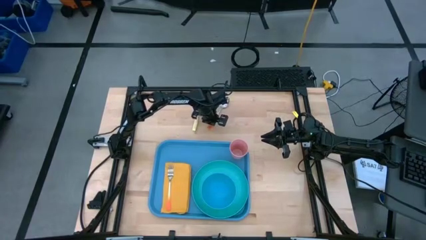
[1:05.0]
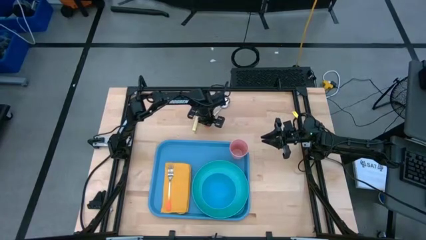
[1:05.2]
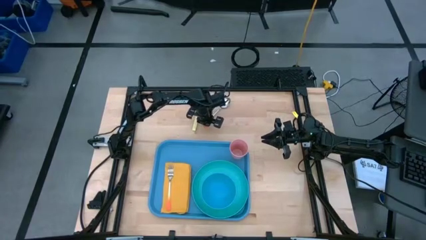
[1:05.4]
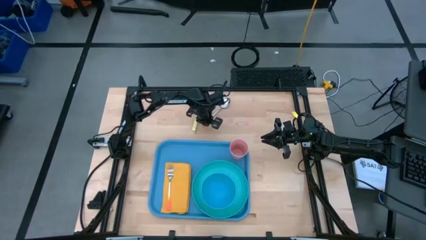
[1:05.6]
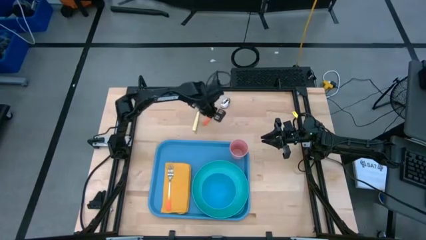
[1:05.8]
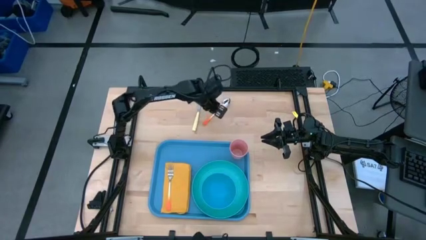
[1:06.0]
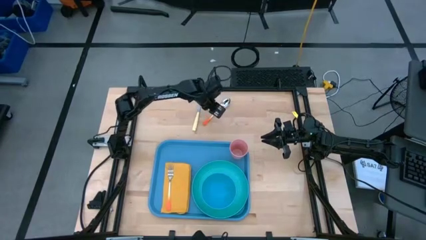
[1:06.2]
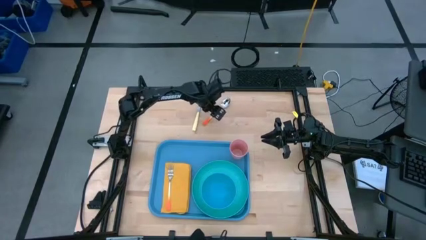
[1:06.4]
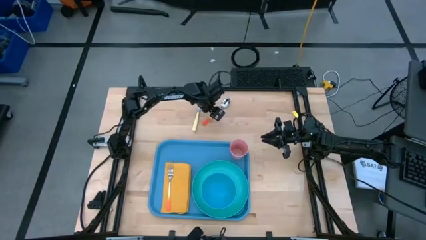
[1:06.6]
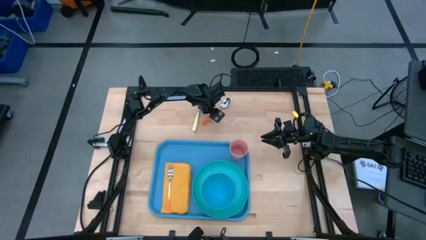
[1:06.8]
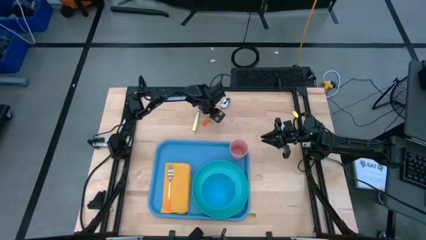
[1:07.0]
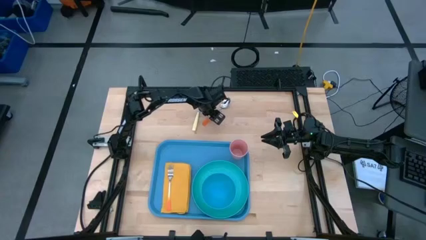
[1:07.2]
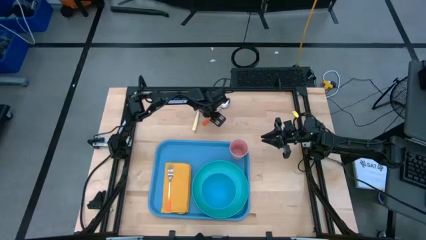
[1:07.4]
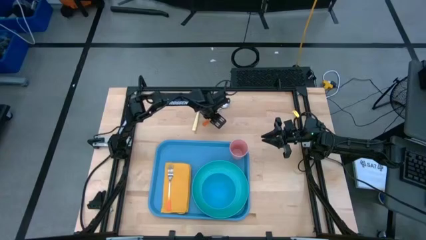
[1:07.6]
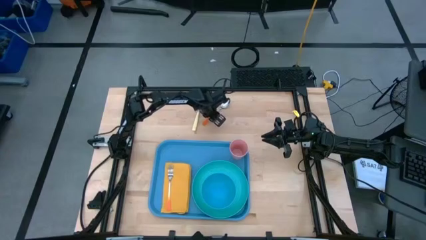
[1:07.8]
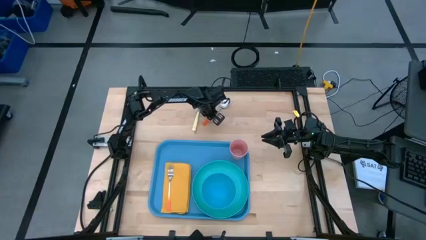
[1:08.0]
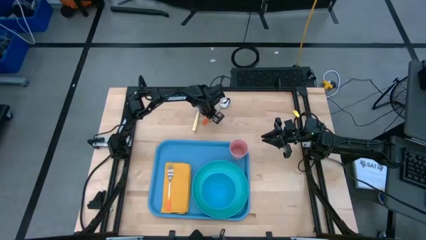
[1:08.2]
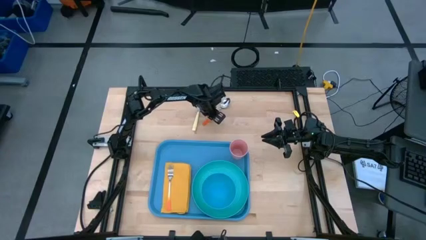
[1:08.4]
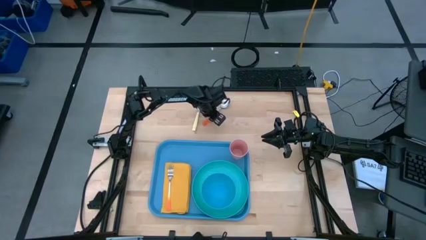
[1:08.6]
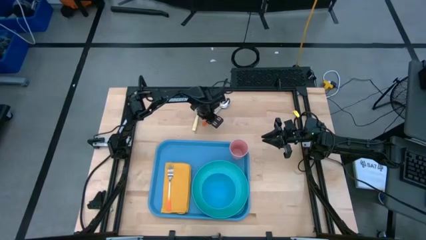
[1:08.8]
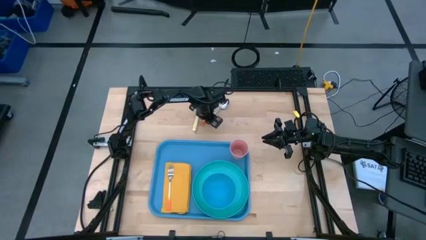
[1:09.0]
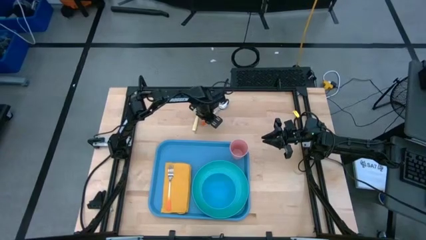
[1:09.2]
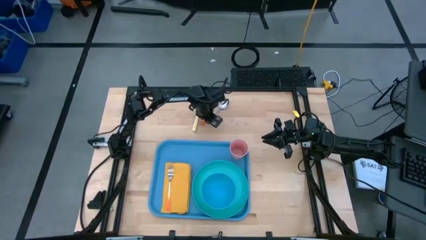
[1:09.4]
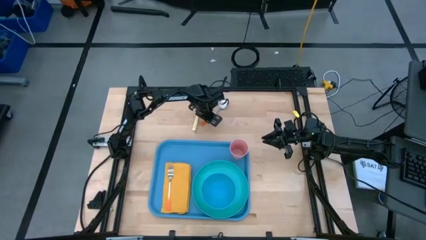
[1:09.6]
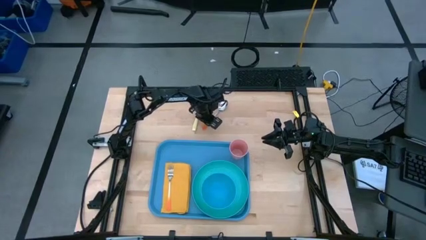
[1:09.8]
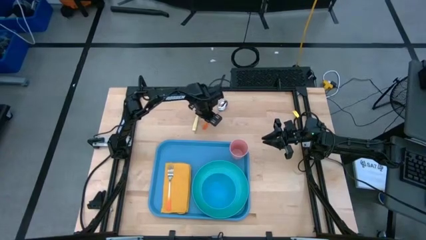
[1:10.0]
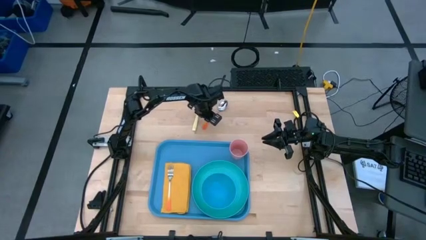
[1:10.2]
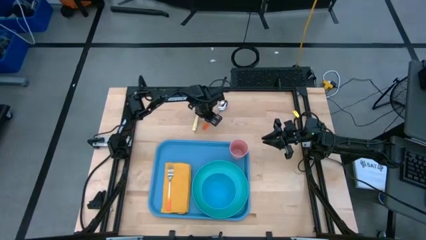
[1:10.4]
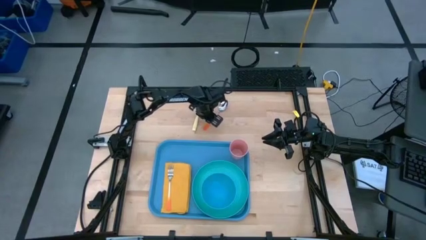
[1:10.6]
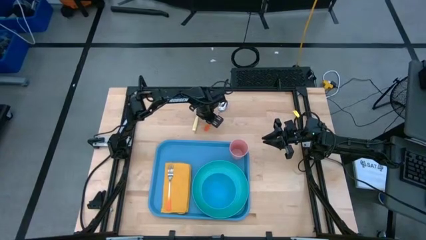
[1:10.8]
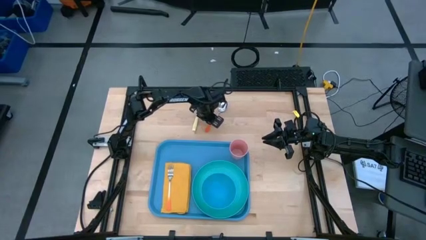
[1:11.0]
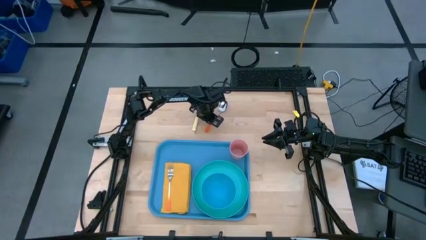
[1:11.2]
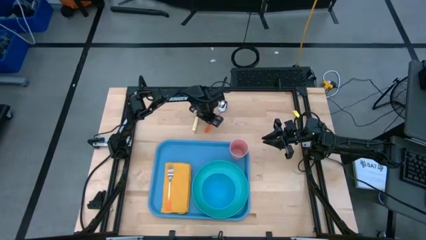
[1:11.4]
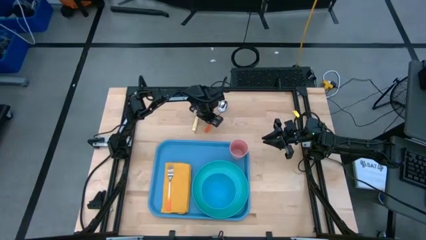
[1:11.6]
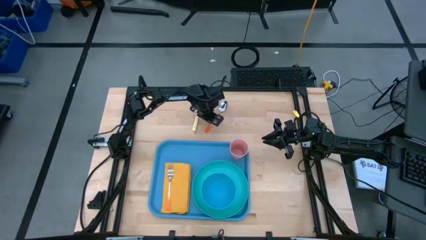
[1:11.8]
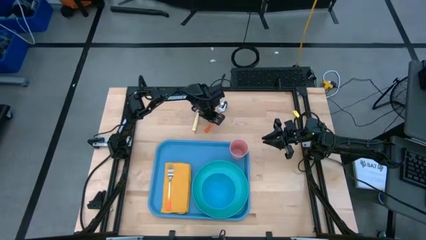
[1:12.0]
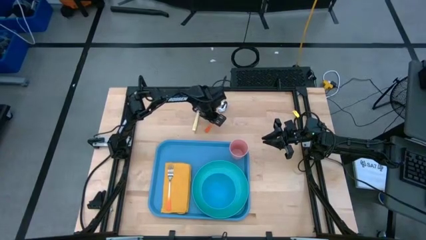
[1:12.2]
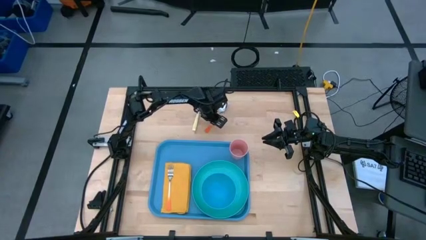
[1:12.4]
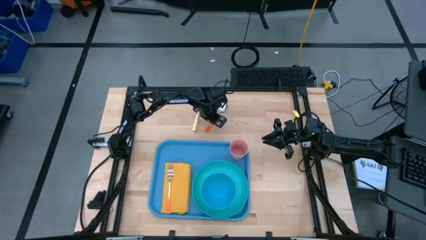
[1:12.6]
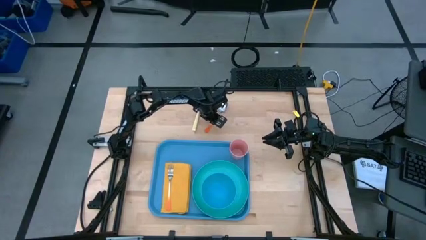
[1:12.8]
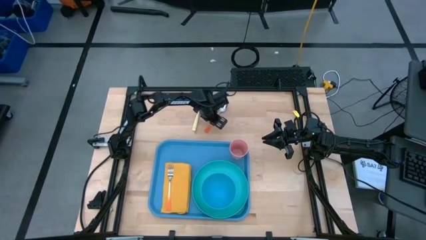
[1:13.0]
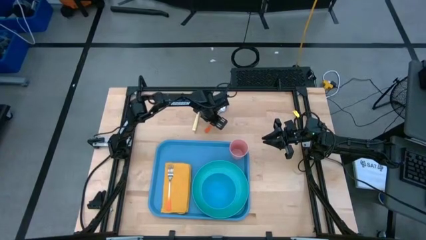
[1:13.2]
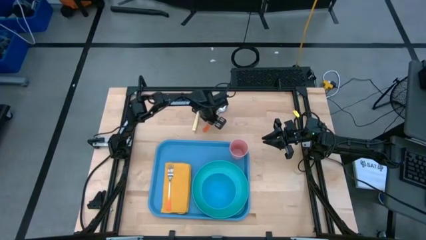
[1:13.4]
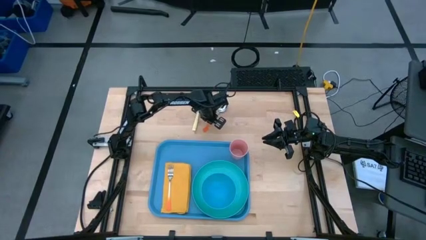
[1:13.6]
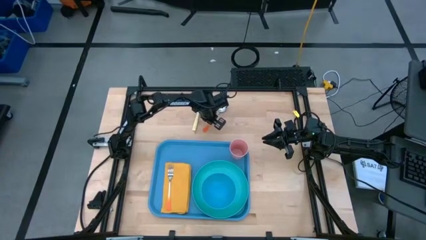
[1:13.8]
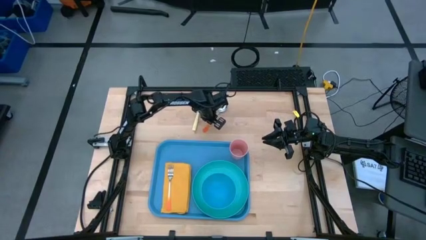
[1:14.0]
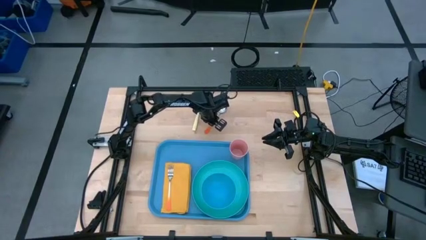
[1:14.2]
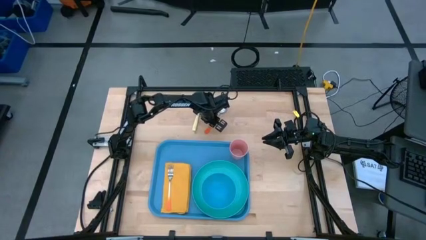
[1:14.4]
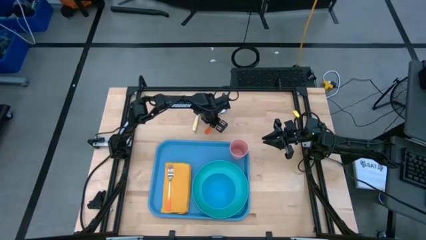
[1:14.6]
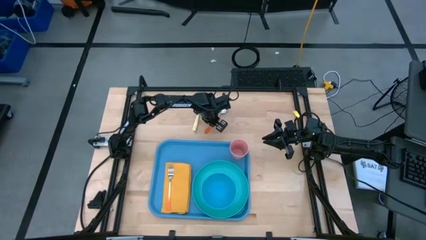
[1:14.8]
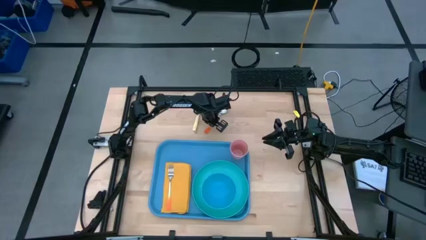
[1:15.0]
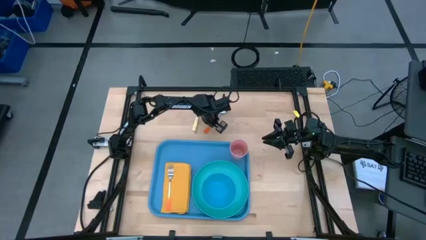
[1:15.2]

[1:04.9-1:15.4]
Task: Set up tray
Put the orange spoon on the yellow napkin to the right of the orange fork

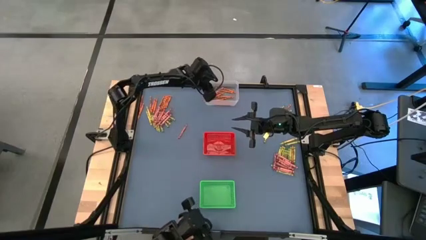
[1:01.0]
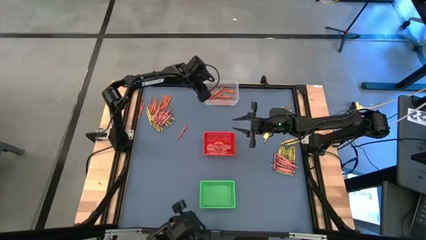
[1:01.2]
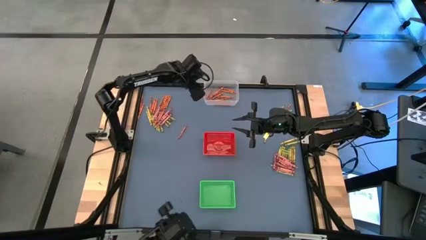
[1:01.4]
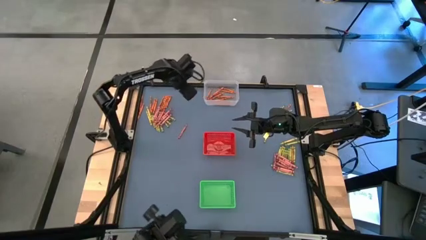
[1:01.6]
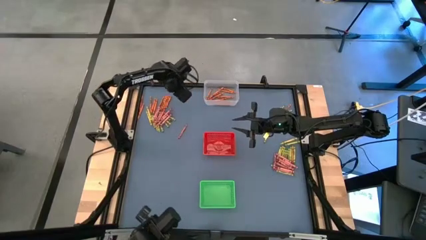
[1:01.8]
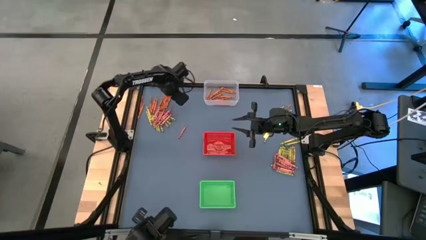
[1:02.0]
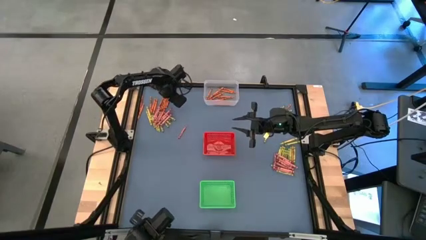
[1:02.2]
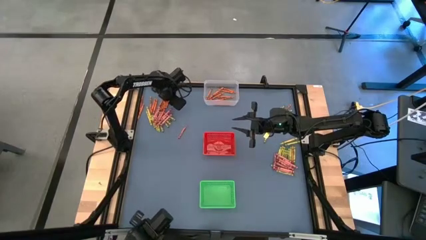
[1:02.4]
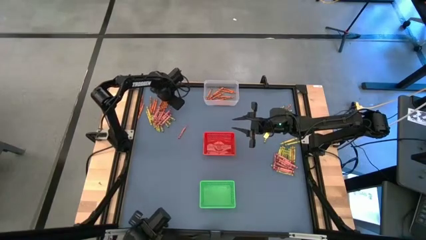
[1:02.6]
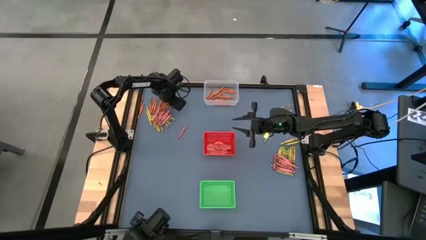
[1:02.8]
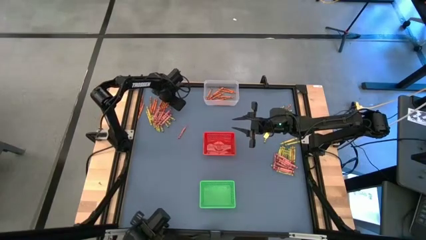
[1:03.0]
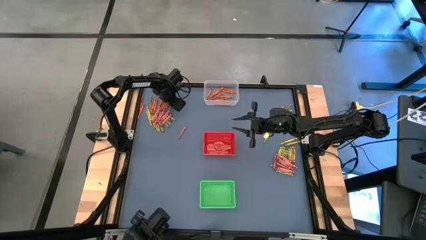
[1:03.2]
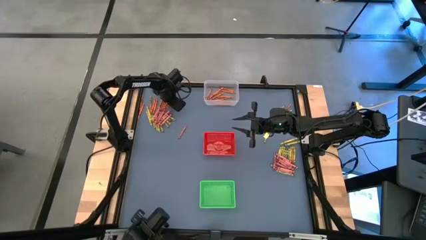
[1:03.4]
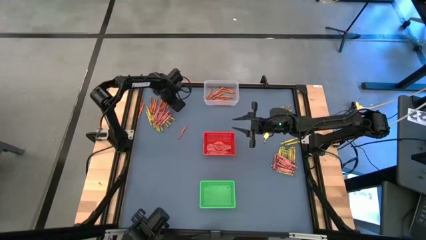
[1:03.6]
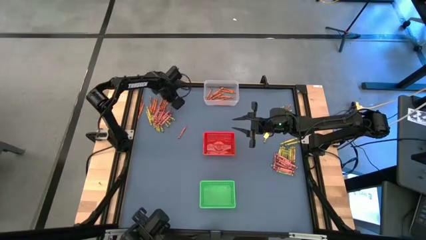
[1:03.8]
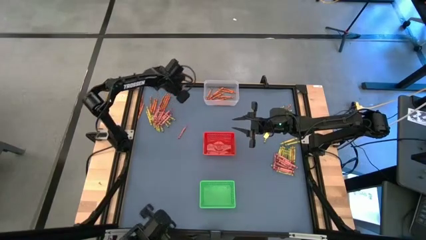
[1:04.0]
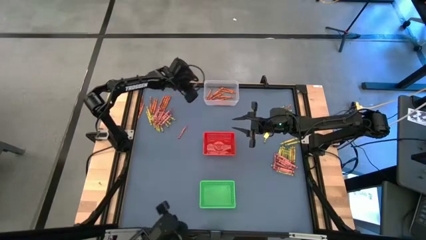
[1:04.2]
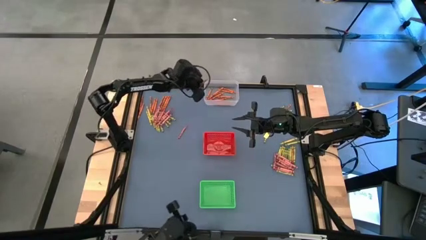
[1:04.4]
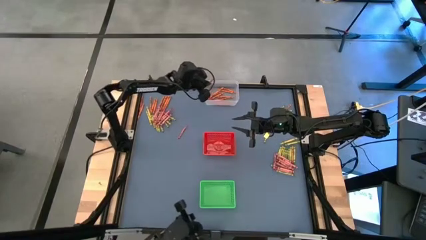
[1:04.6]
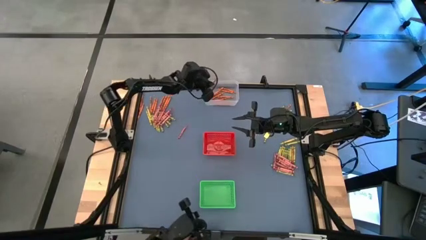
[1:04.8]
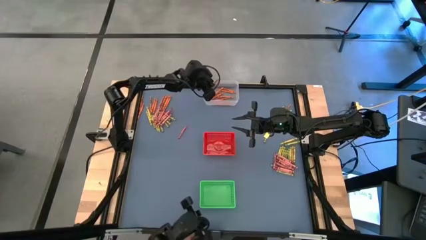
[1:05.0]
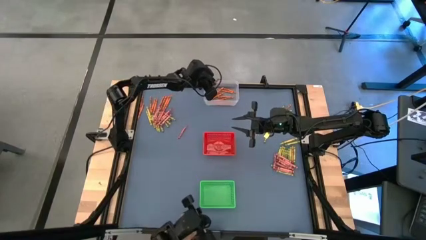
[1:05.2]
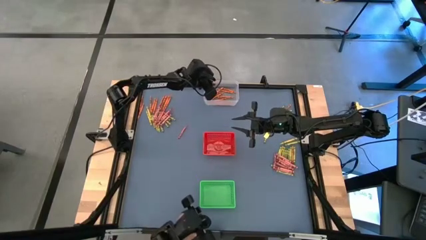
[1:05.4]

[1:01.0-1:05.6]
Task: Sort crayons
Put the orange crayon into the transparent bin
